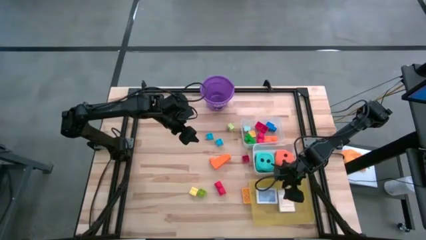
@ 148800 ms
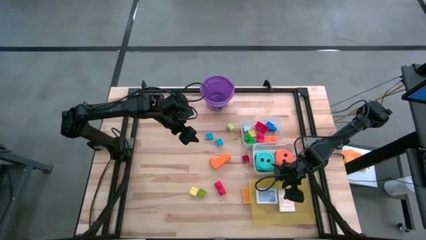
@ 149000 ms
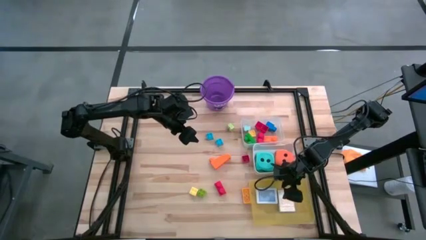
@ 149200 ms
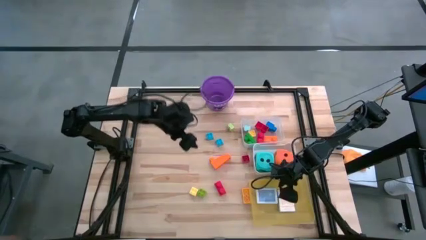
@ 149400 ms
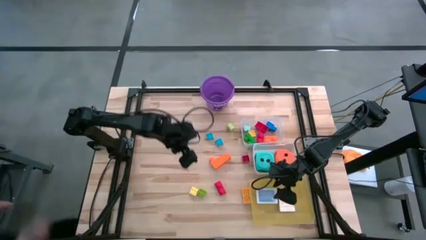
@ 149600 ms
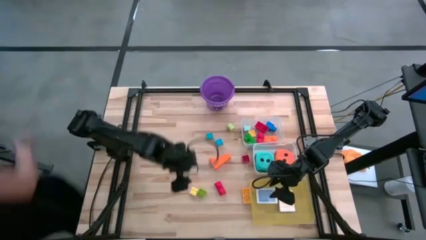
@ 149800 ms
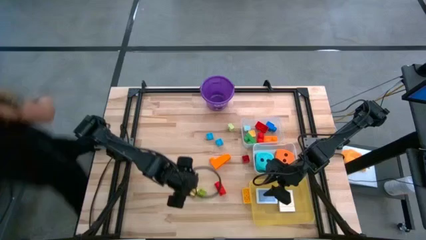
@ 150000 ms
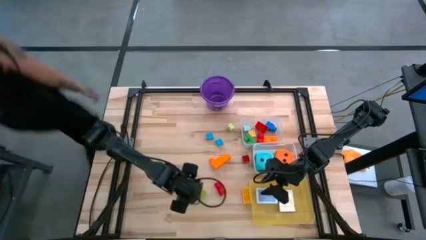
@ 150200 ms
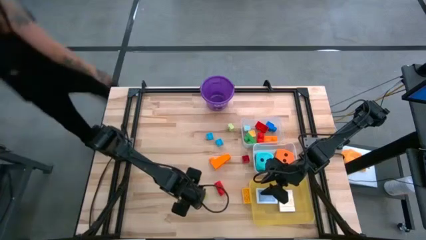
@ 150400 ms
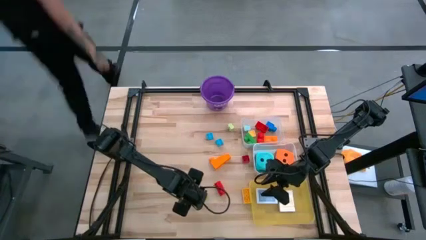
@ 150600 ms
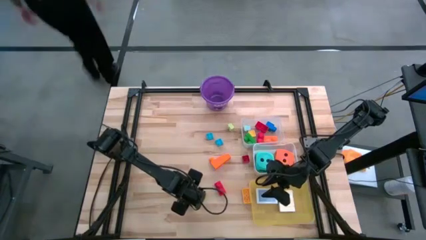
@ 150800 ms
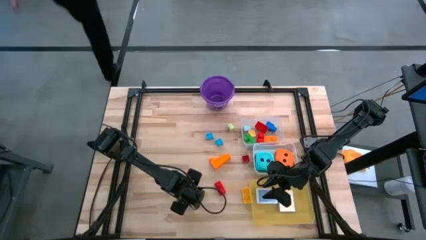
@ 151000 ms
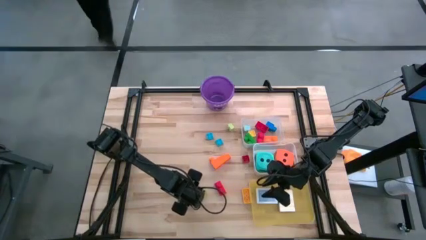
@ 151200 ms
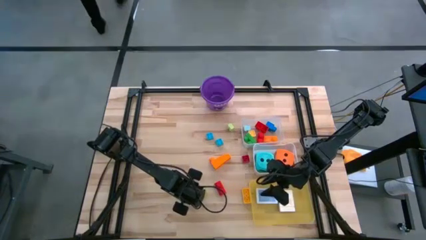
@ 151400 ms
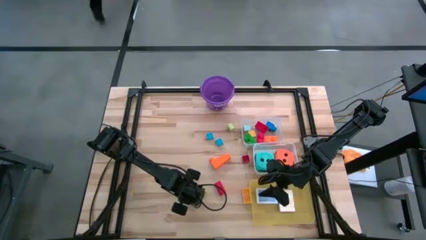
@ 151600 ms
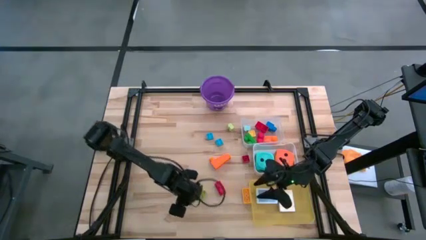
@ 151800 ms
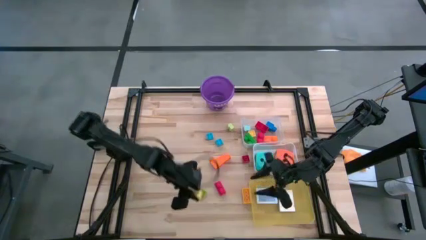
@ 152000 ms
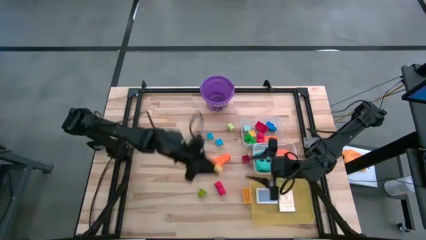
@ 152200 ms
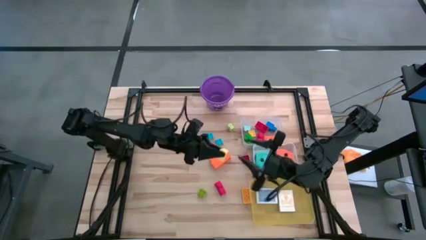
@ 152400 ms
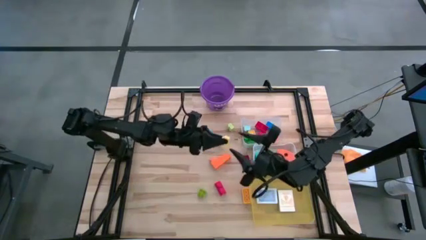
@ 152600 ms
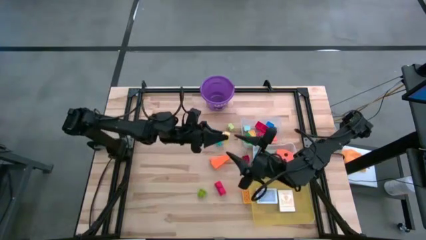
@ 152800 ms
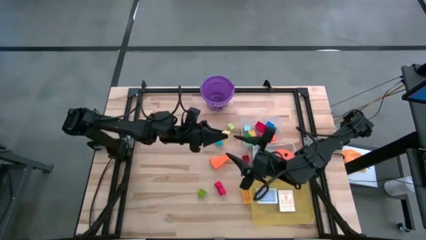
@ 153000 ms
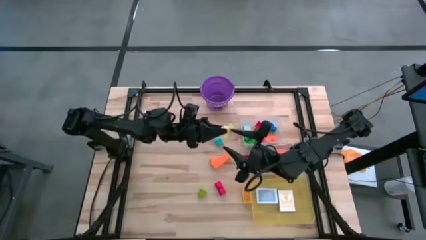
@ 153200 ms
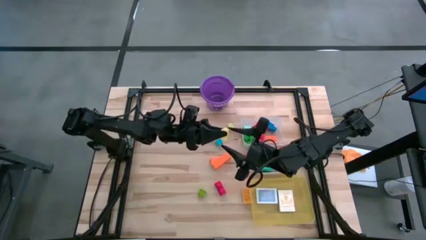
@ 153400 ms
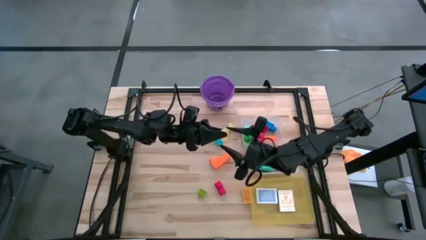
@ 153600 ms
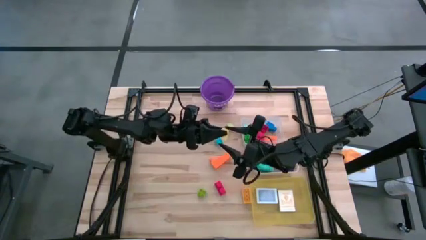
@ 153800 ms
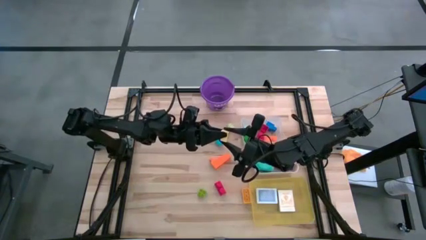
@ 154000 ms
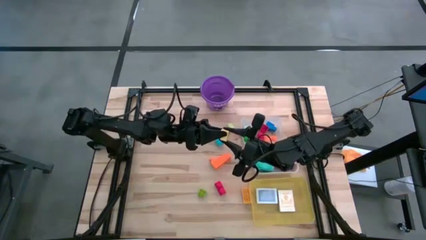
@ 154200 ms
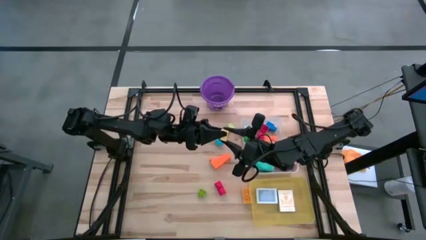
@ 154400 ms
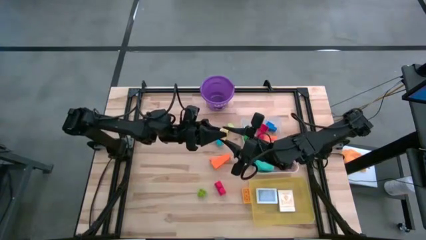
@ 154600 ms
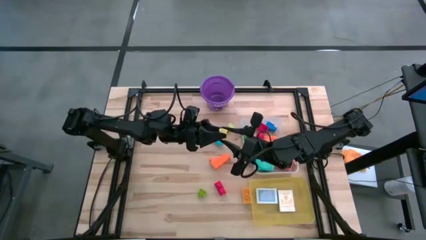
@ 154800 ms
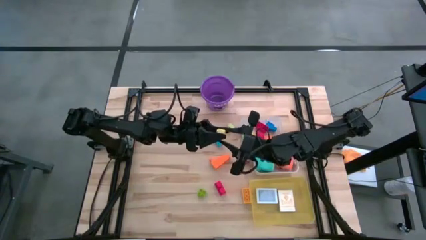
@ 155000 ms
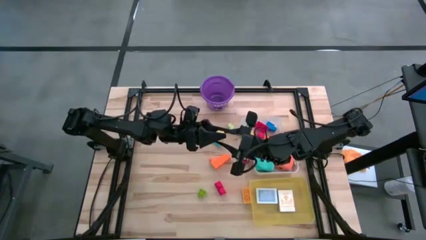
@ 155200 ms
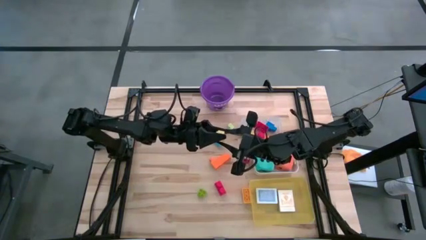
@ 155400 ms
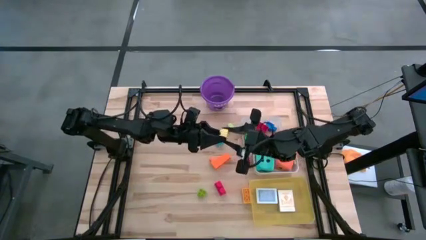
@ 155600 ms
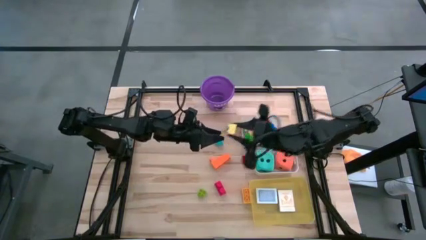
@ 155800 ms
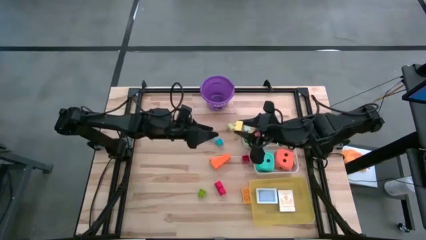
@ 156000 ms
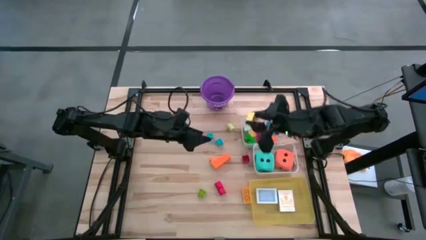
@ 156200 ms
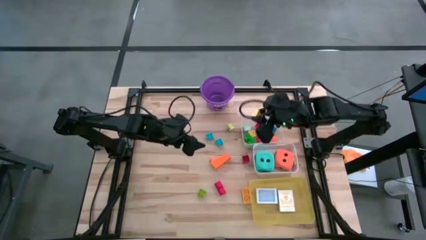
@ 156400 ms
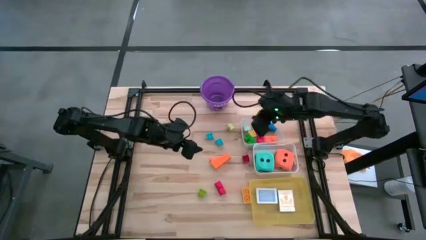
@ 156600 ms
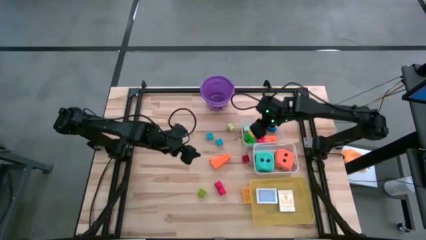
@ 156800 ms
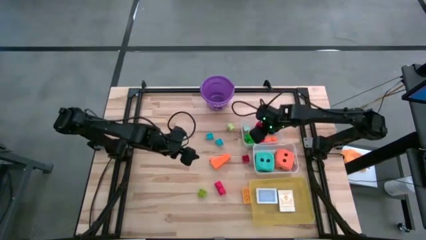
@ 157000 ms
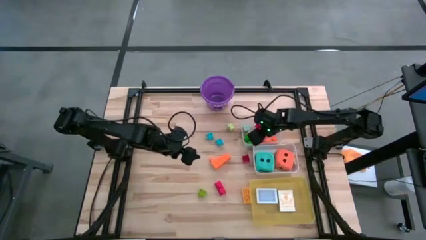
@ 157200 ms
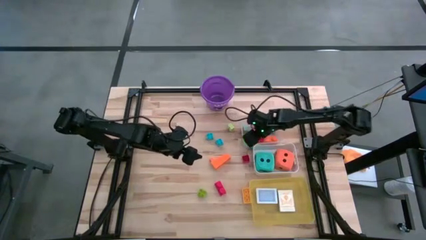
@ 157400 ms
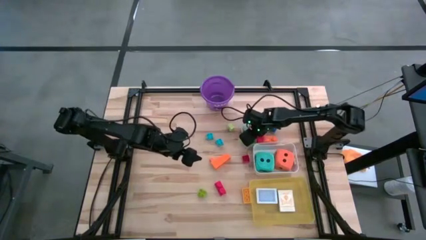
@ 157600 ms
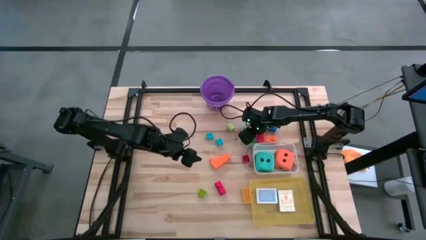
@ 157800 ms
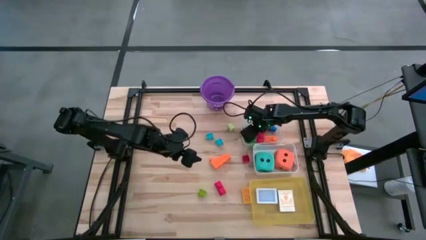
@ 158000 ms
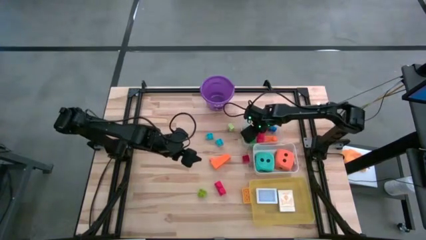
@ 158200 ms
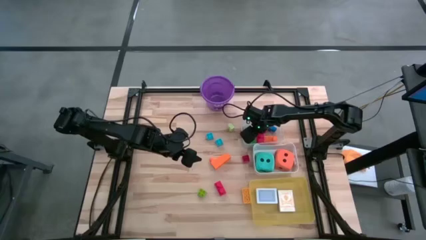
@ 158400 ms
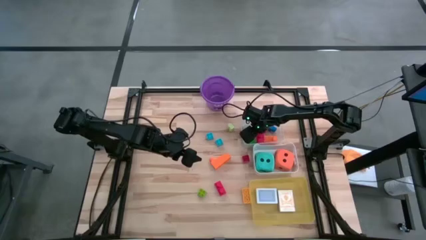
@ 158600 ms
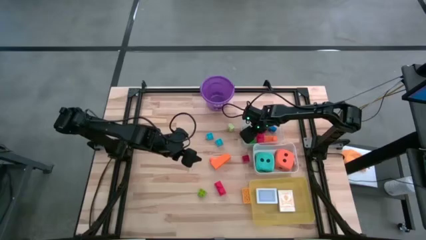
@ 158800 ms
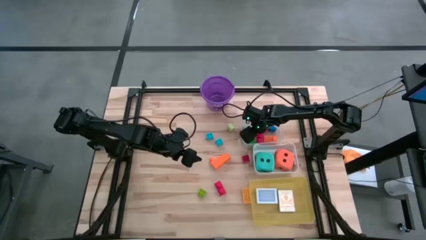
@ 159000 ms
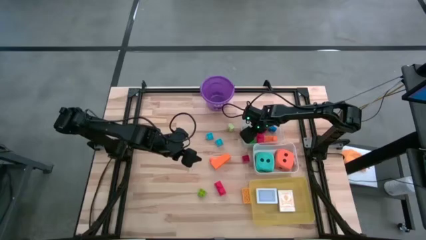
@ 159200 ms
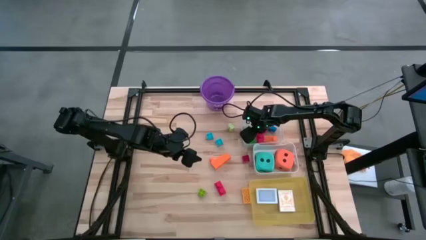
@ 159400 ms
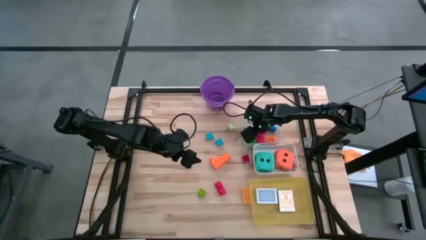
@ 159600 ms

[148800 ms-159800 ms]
Task: Pick & Place Toys
Put the light yellow game piece into the transparent bin

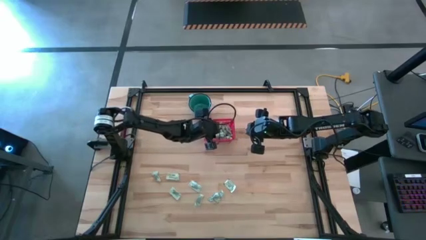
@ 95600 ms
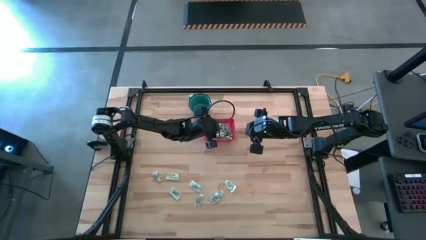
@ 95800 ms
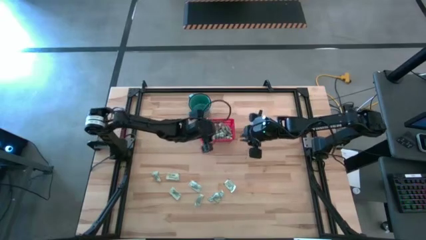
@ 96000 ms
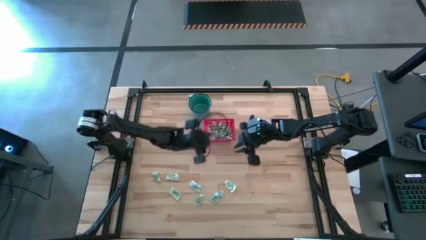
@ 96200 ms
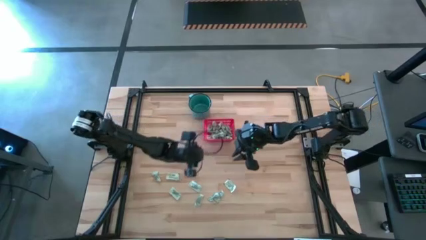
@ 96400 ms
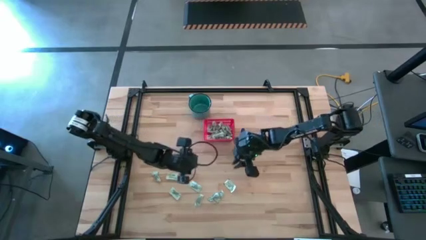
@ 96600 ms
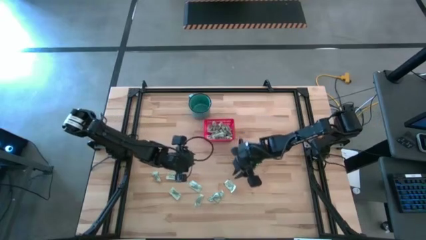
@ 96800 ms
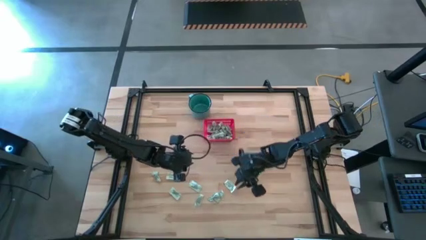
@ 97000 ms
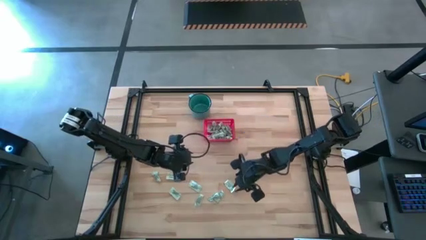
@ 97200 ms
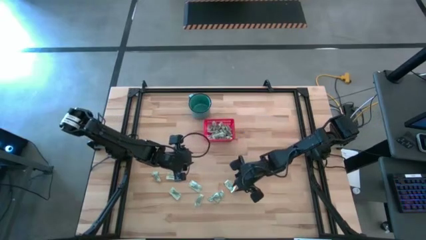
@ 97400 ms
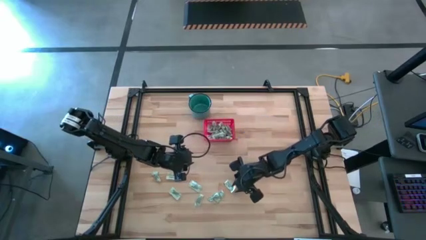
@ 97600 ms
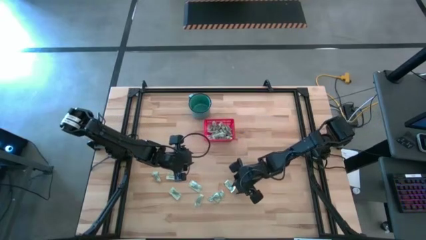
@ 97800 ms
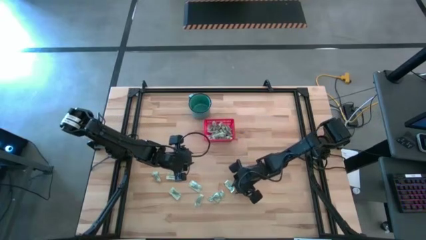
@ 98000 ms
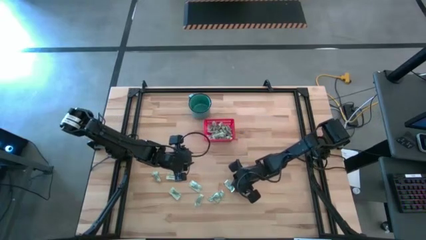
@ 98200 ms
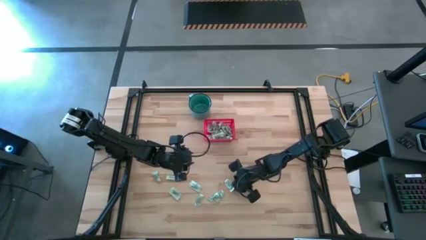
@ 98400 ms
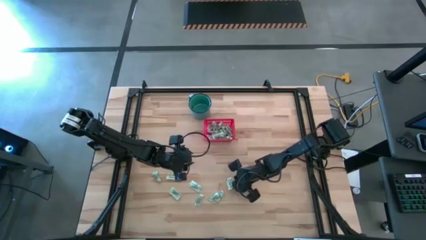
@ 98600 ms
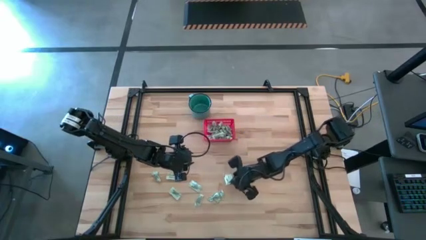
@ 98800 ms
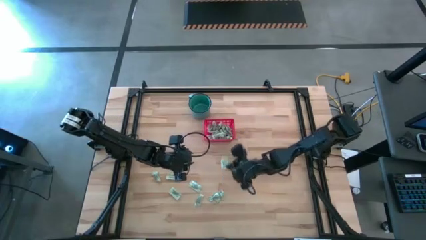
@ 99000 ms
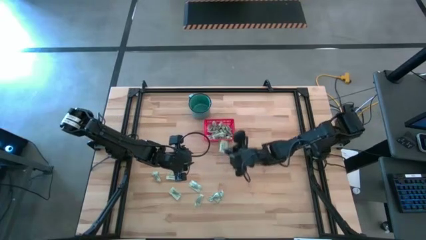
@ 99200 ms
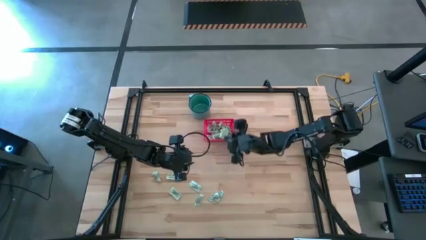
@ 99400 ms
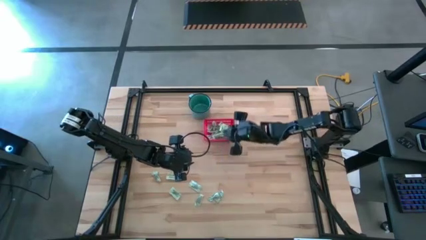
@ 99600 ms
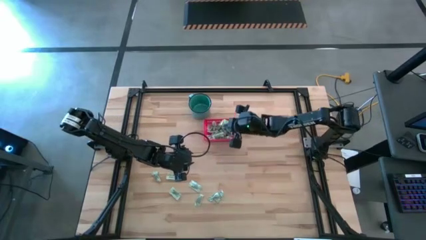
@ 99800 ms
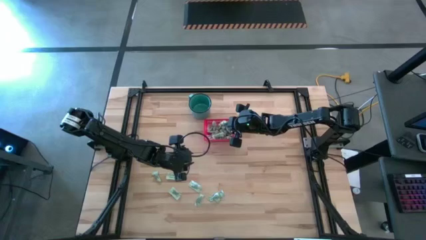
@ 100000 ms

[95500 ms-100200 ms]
Task: Pick and place items into bin
Put the light green stevia packet into the red bin

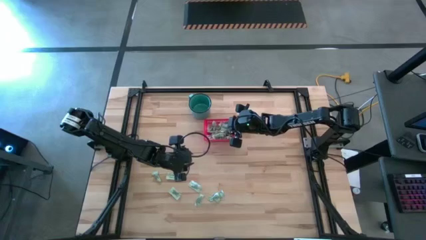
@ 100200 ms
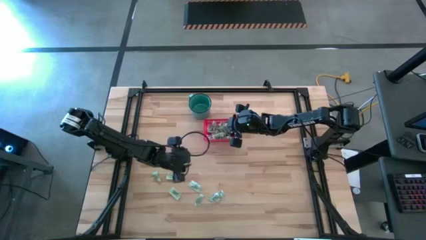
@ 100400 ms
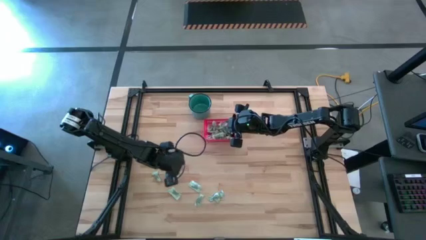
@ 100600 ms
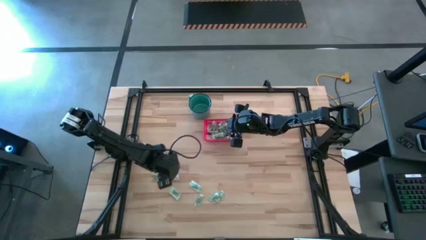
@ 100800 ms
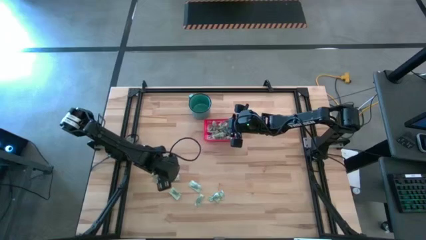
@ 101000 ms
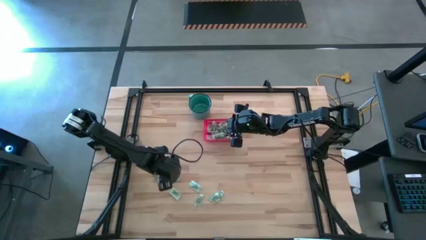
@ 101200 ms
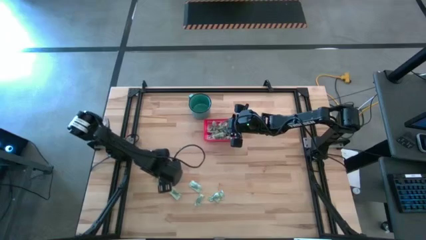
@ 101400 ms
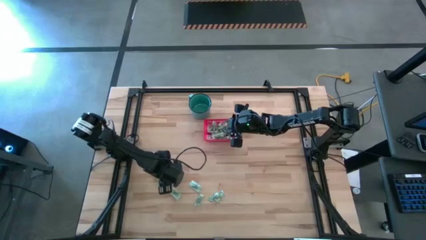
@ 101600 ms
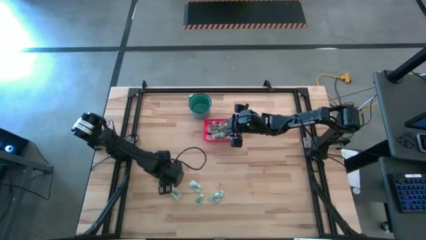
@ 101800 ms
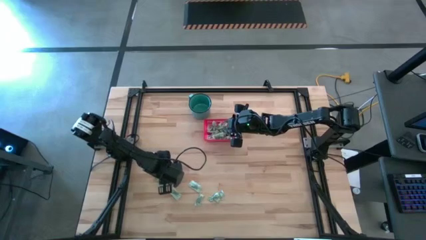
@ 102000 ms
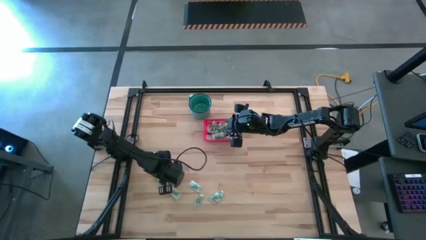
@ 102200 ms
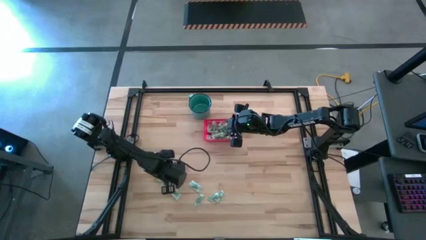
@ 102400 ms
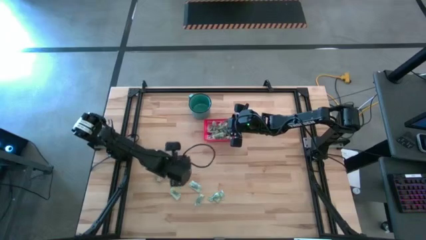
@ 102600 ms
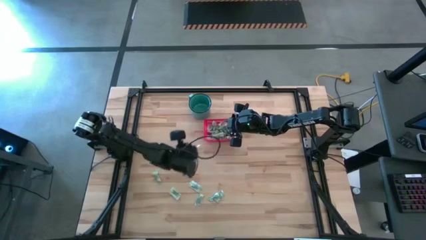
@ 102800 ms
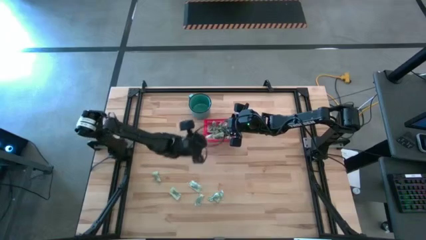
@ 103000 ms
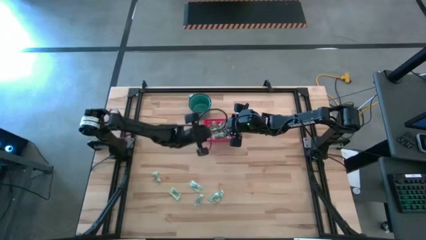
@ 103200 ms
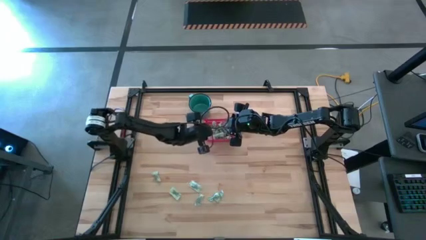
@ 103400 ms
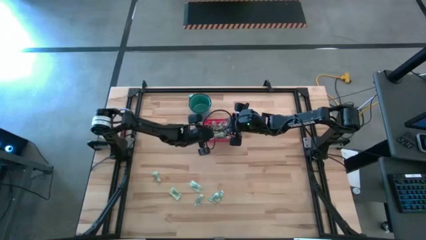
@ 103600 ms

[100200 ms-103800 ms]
Put the light green stevia packet into the red bin
